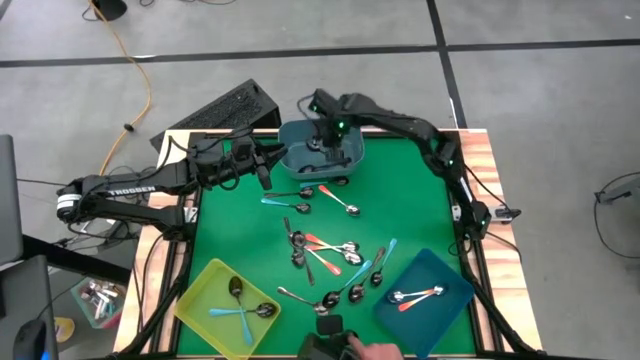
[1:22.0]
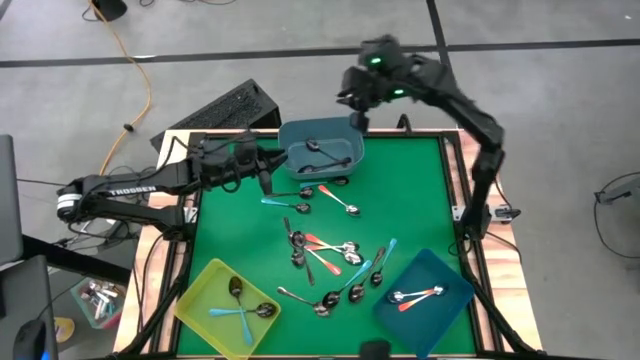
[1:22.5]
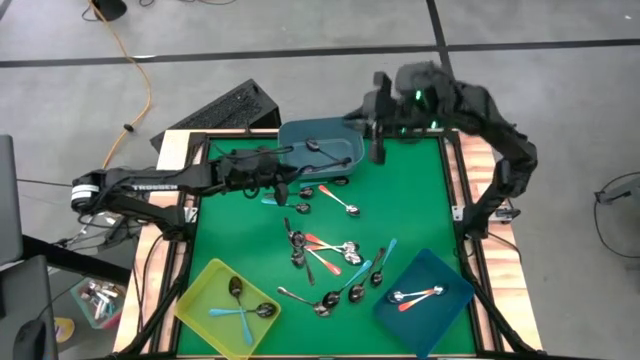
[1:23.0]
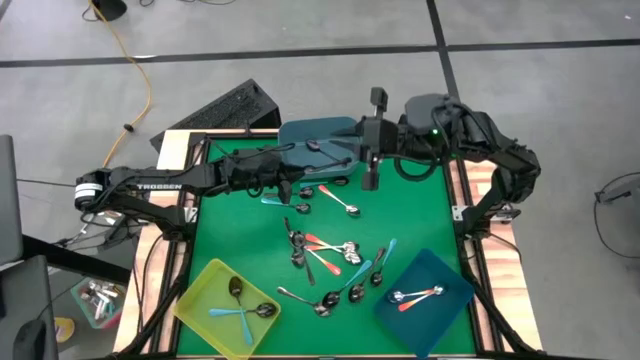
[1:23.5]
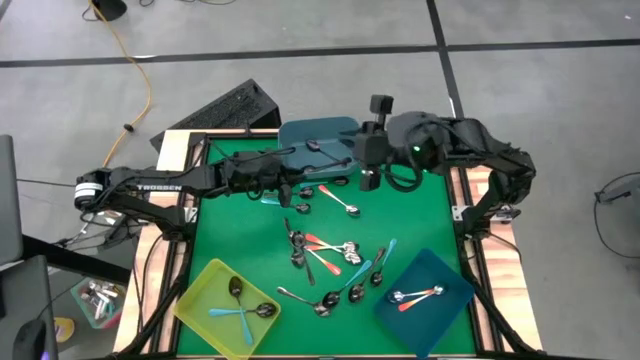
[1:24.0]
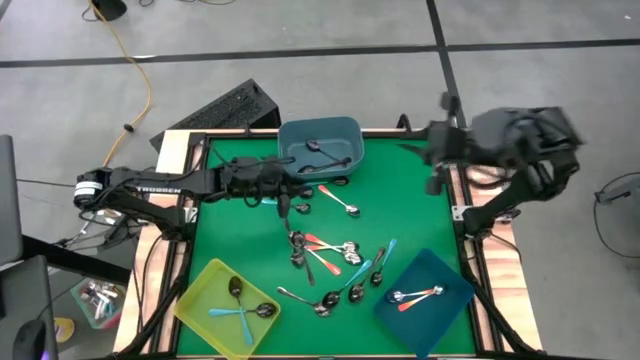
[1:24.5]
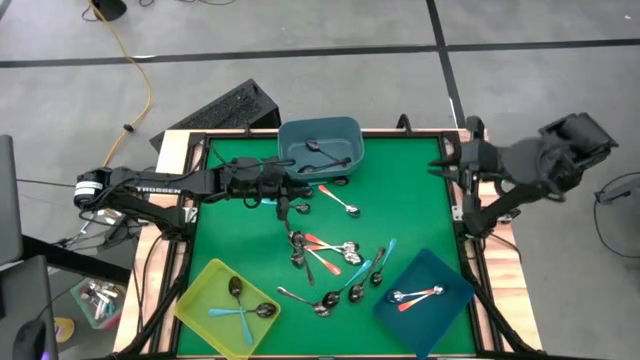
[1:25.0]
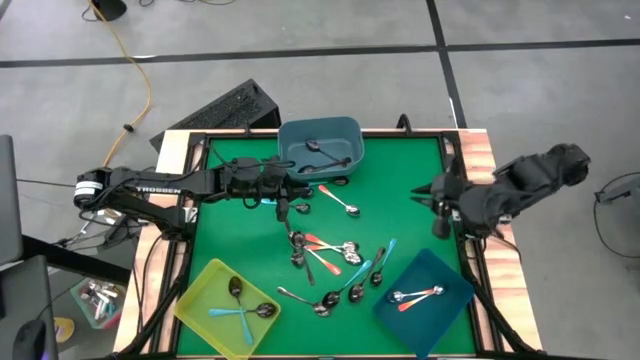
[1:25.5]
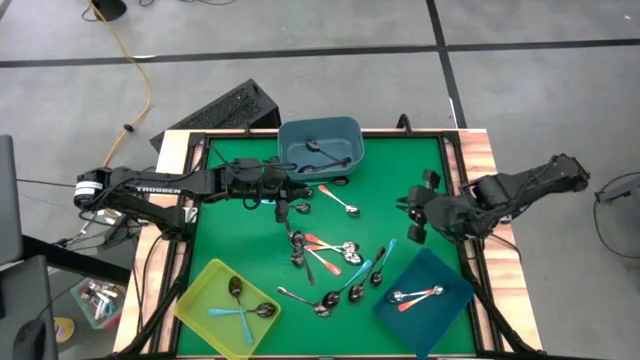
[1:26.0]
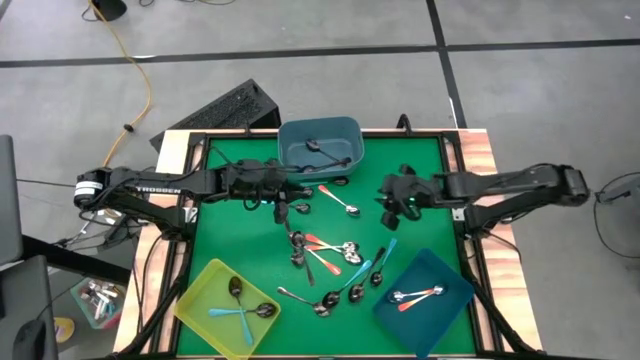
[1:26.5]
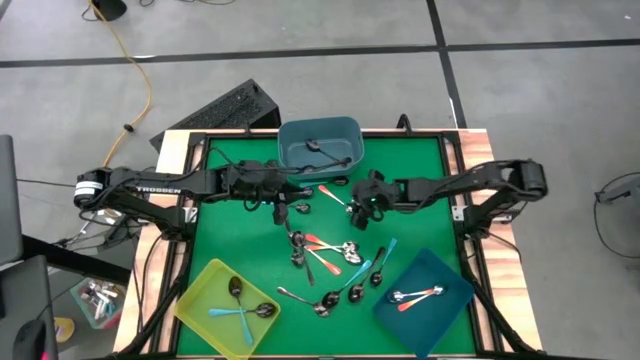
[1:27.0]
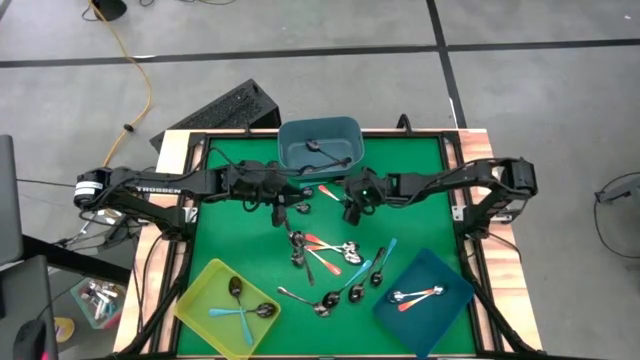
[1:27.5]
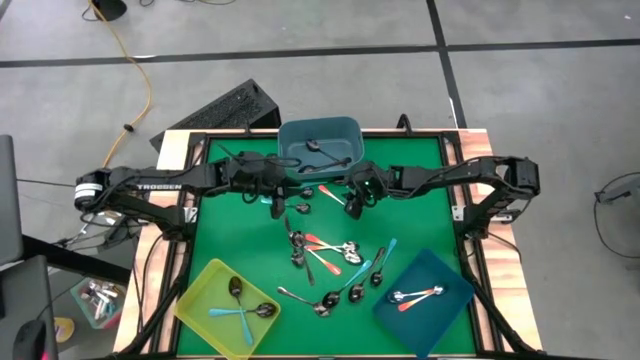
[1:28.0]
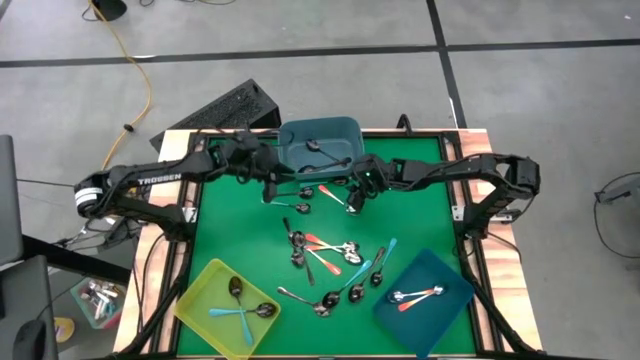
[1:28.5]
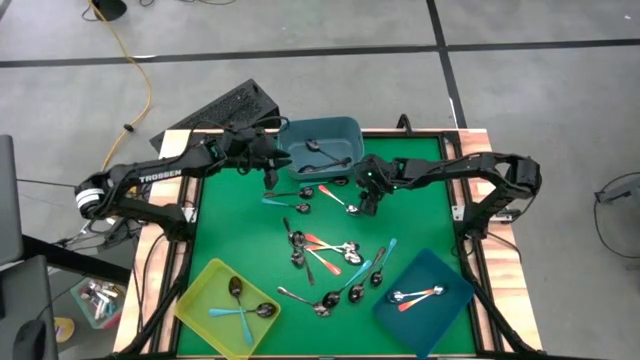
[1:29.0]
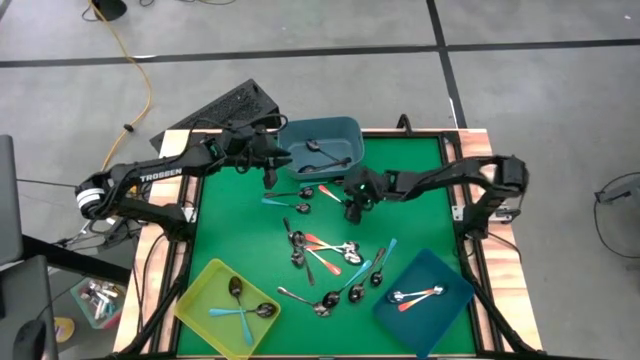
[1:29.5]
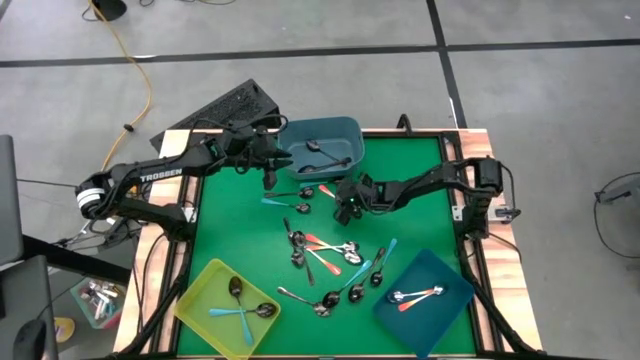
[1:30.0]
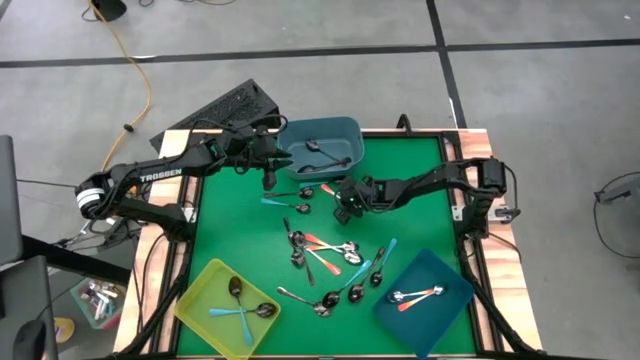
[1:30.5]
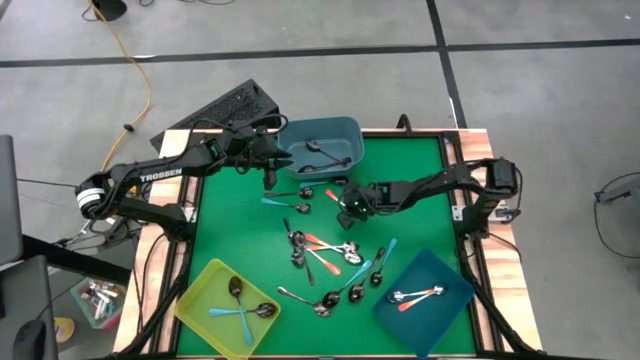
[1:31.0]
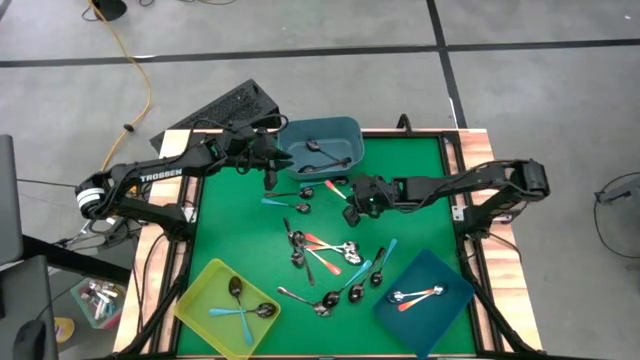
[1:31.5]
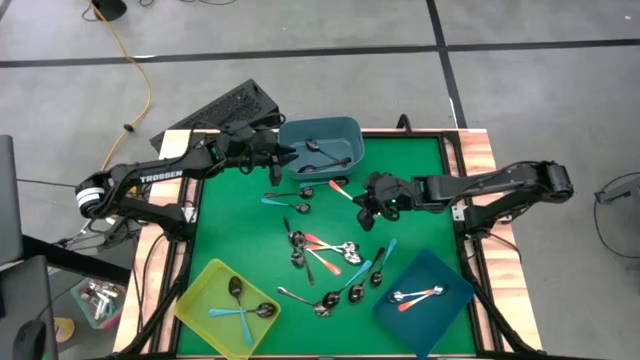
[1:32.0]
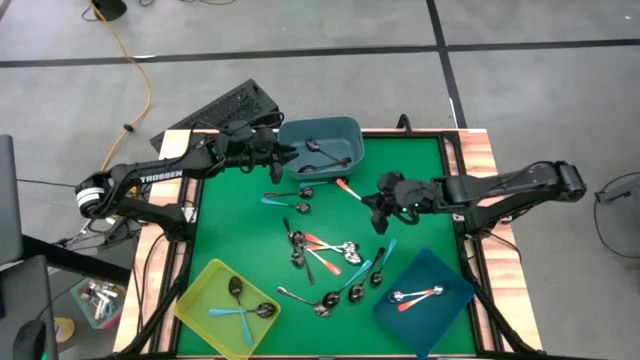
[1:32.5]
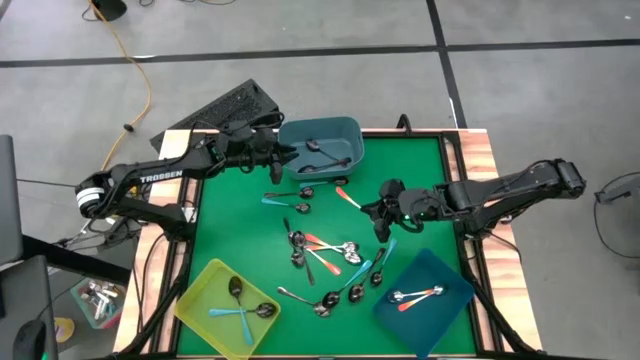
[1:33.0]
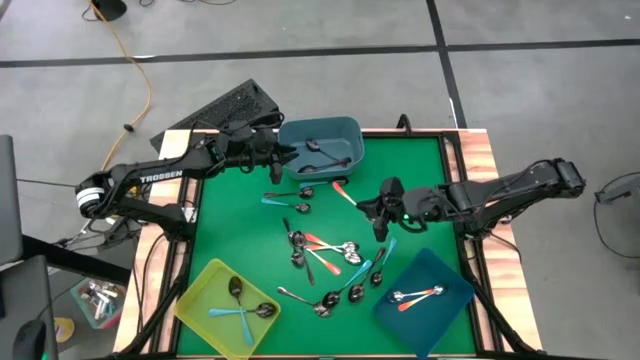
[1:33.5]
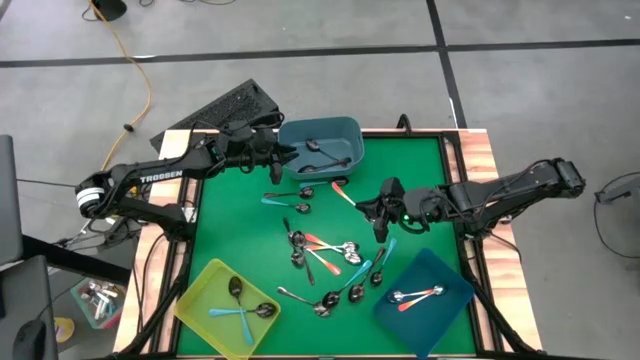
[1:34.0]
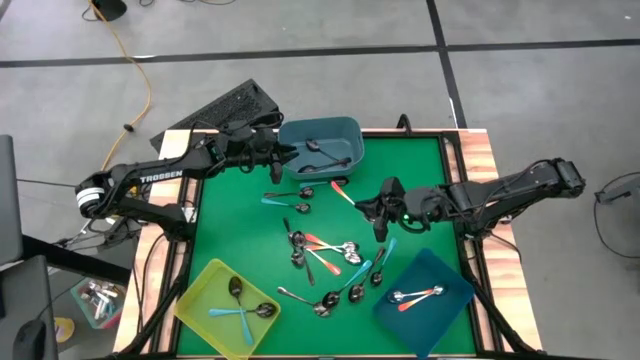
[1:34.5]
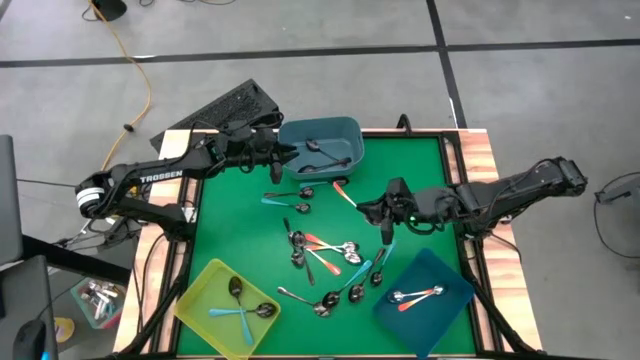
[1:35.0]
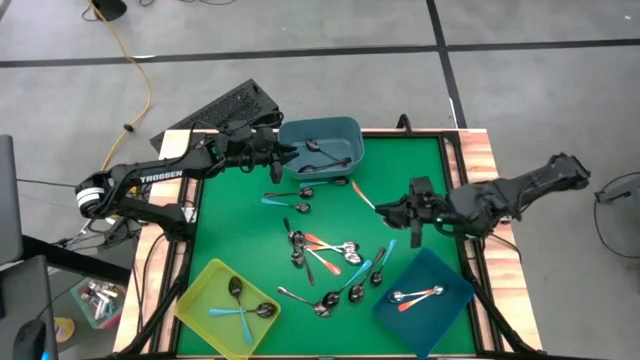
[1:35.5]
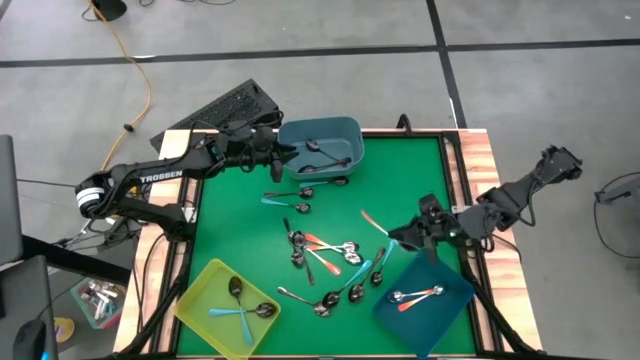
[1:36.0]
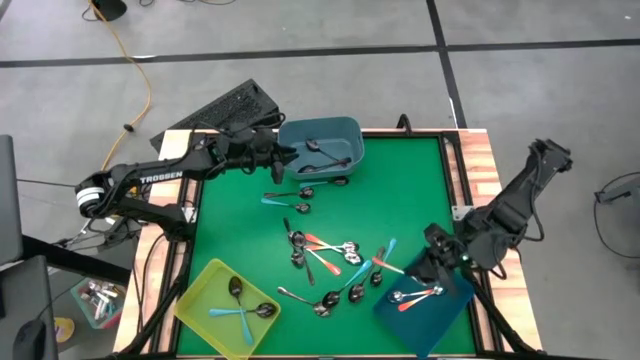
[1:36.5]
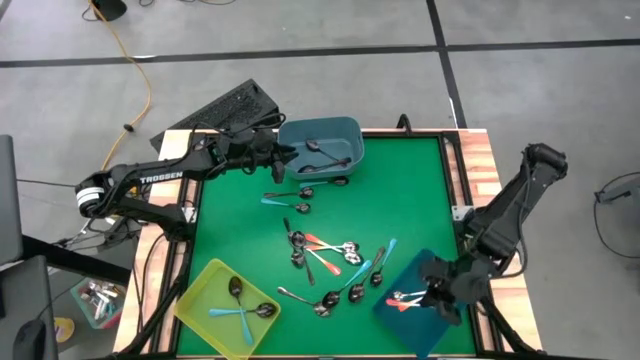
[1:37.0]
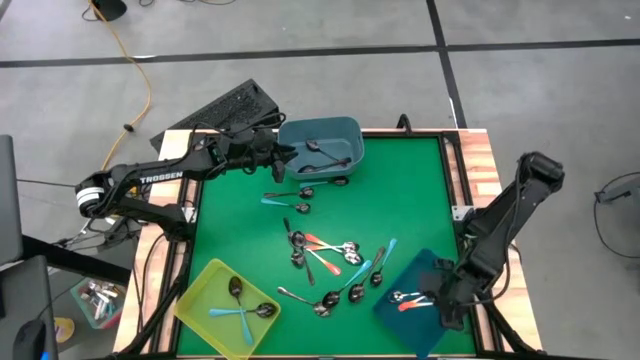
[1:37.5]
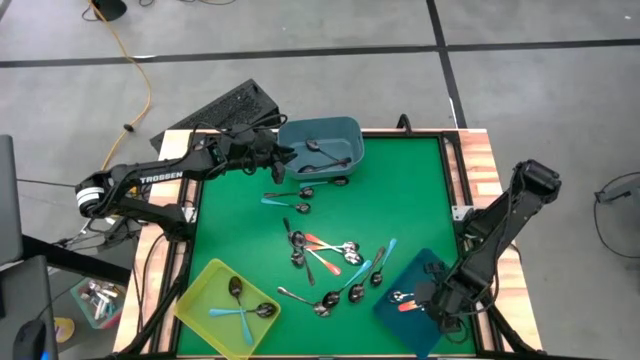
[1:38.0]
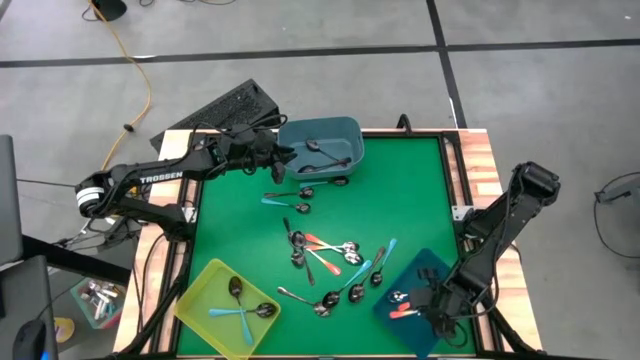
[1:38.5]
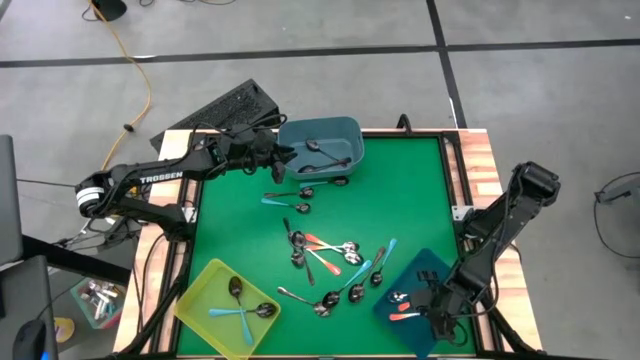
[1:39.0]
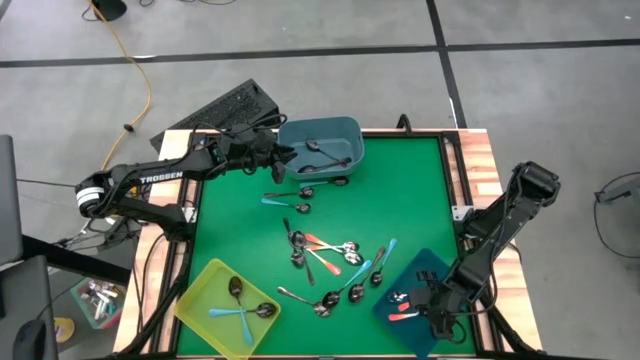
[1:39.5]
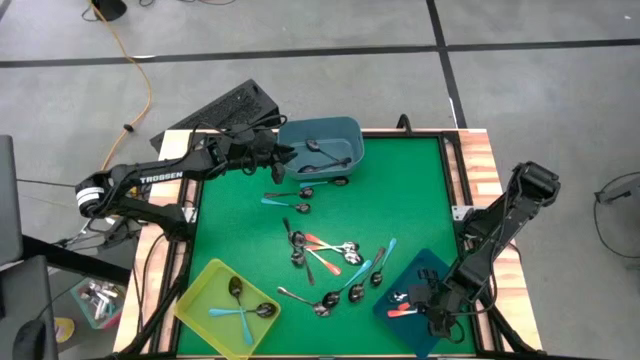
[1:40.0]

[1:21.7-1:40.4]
Task: Sort silverware by color (type)
Put the orange spoon into the blue bin

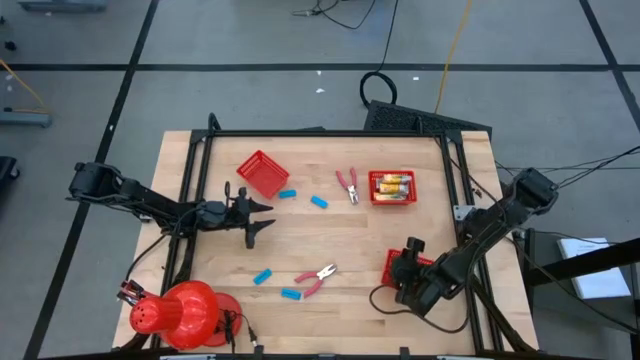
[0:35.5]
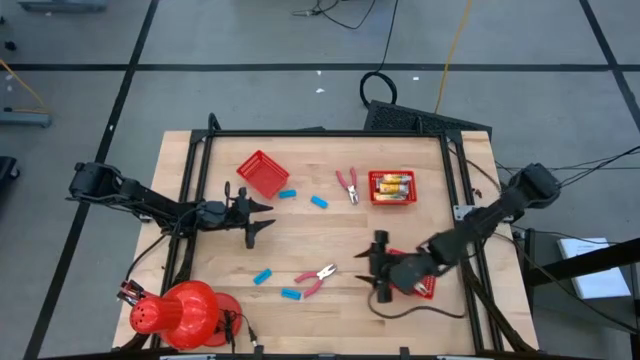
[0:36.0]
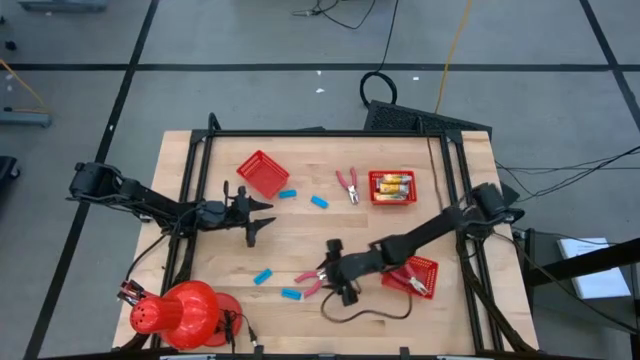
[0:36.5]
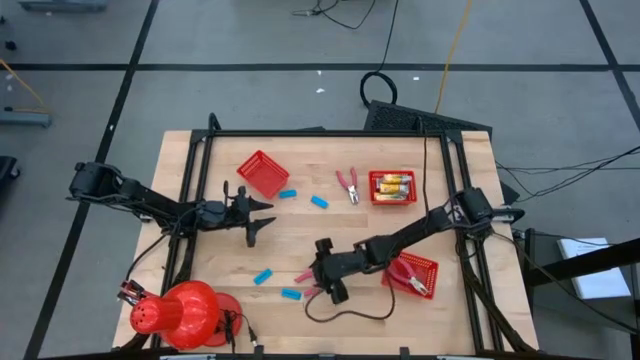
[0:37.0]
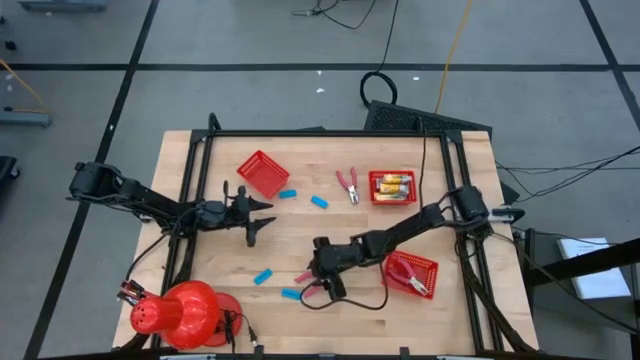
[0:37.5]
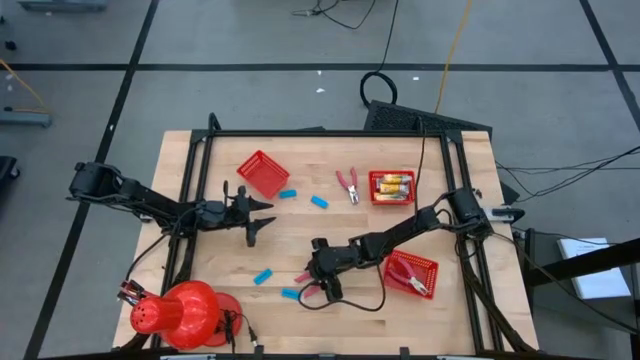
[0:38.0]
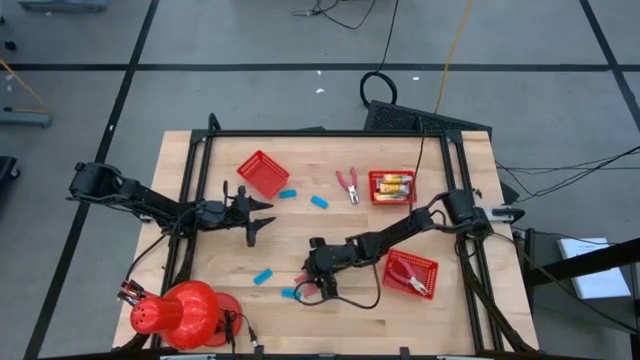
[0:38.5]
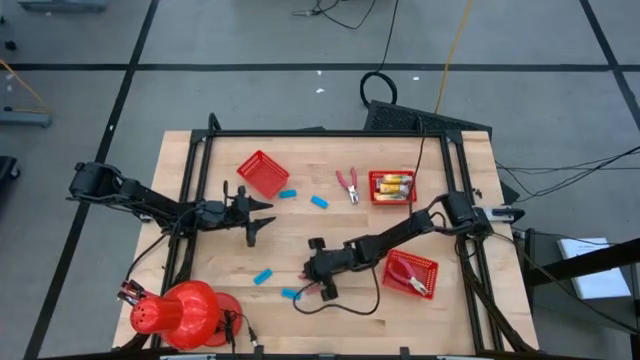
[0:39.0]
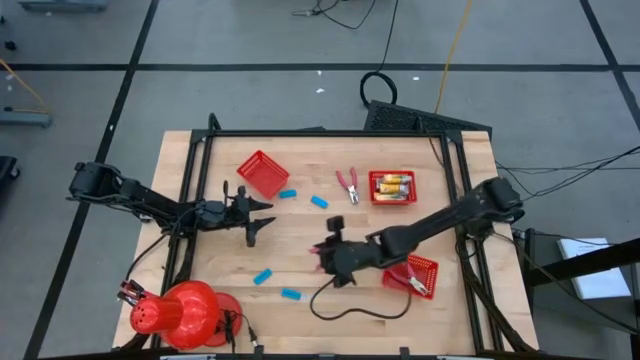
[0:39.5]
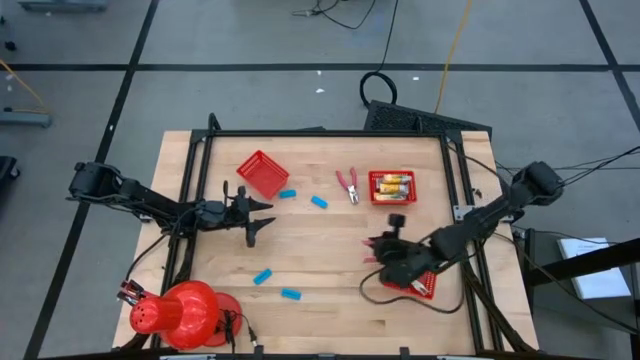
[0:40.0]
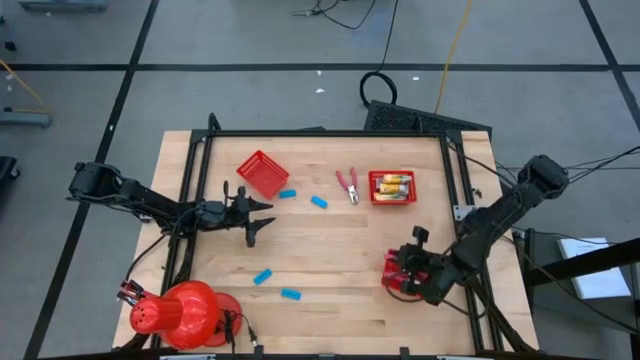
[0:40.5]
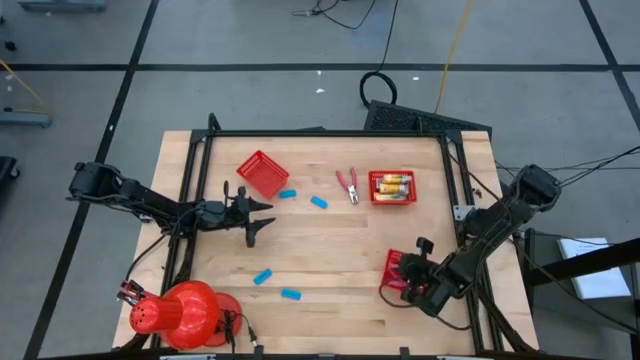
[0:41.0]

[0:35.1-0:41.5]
Task: Pick & Place School Supplies
Put the pink hole puncher into the bottom red bin
